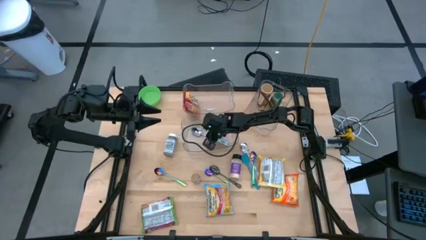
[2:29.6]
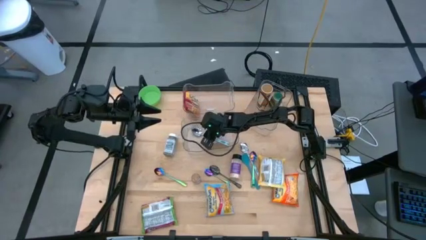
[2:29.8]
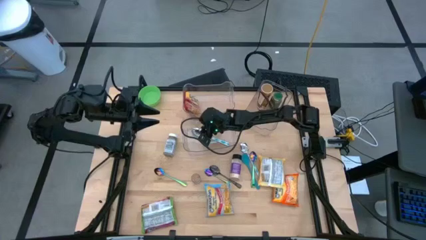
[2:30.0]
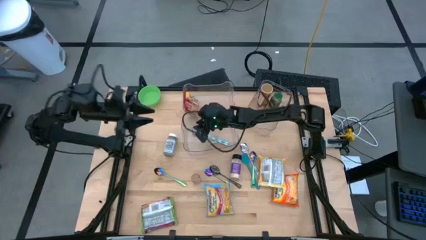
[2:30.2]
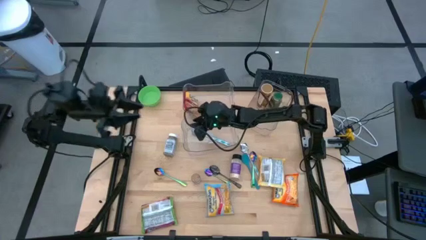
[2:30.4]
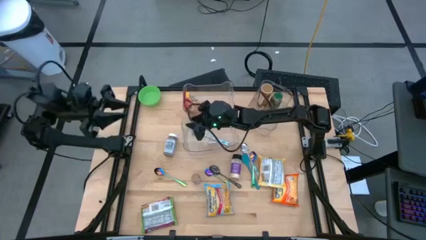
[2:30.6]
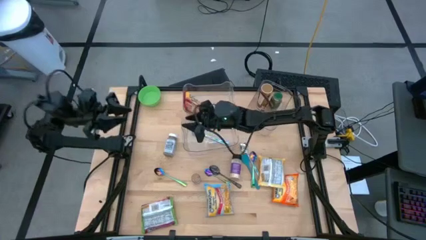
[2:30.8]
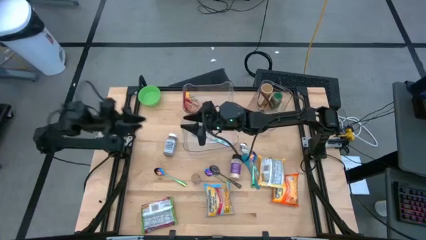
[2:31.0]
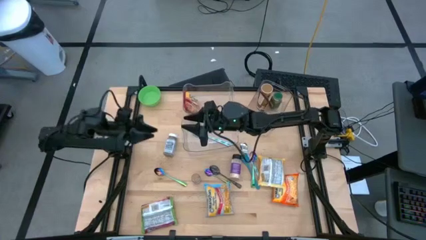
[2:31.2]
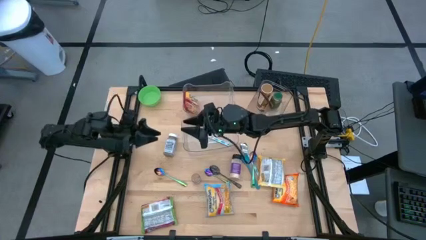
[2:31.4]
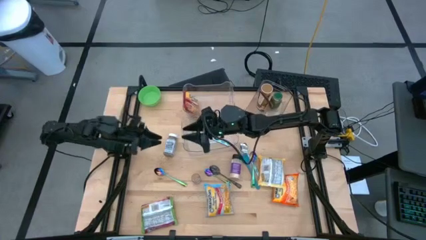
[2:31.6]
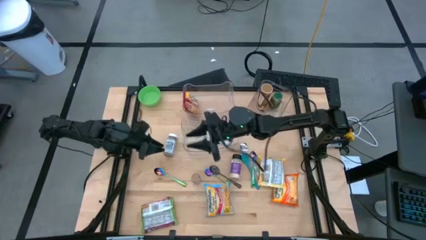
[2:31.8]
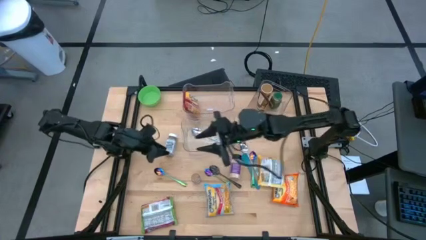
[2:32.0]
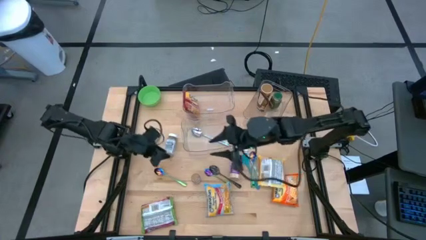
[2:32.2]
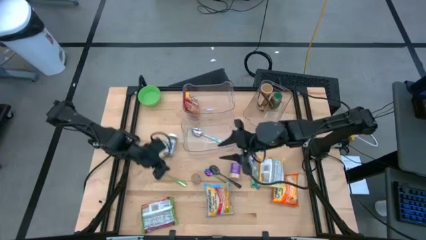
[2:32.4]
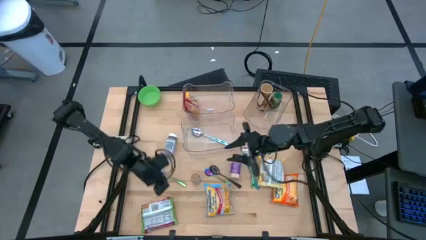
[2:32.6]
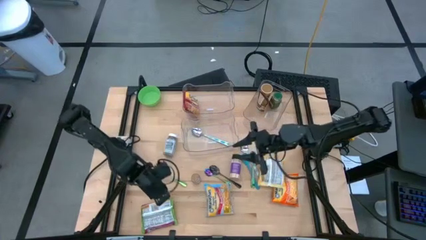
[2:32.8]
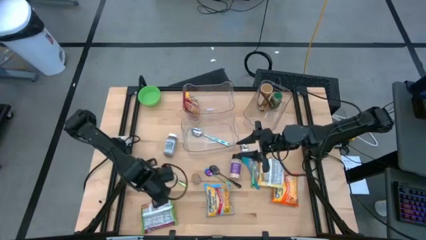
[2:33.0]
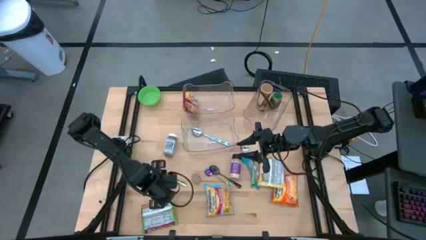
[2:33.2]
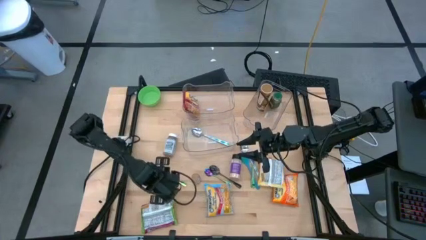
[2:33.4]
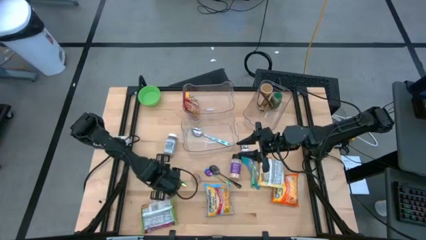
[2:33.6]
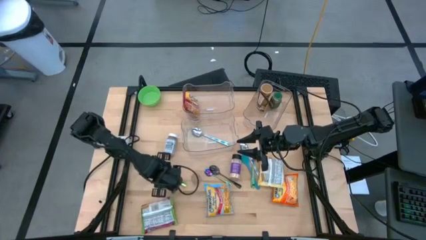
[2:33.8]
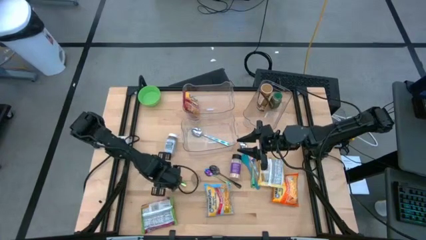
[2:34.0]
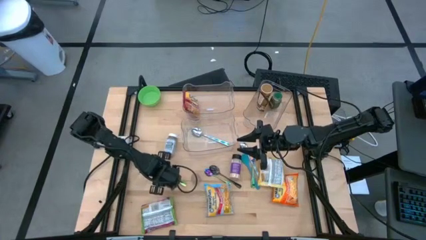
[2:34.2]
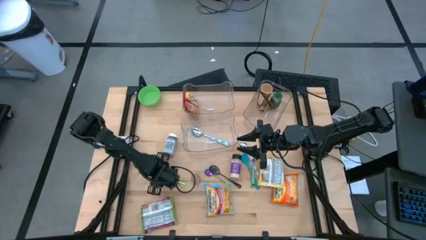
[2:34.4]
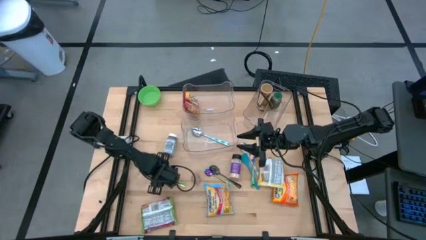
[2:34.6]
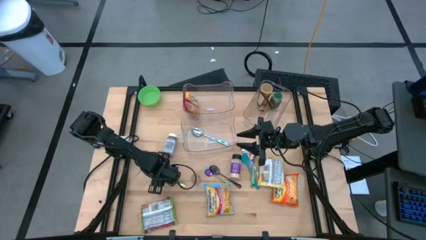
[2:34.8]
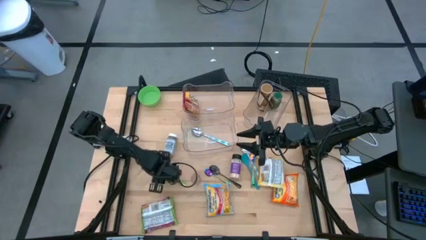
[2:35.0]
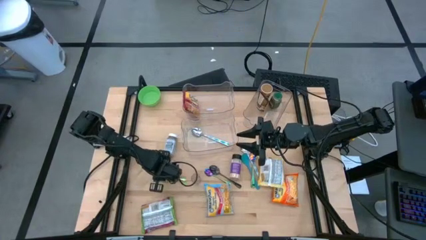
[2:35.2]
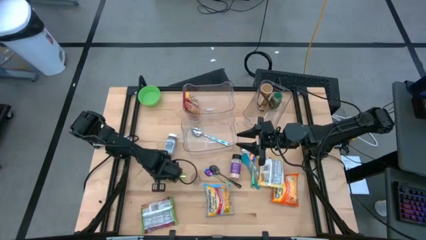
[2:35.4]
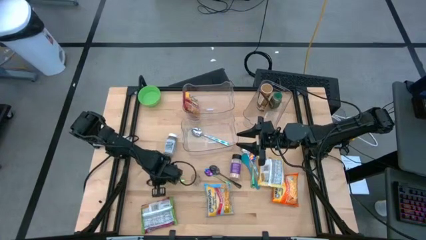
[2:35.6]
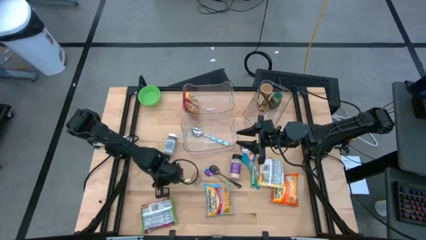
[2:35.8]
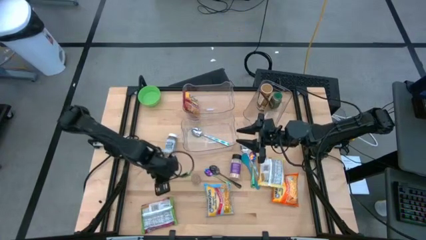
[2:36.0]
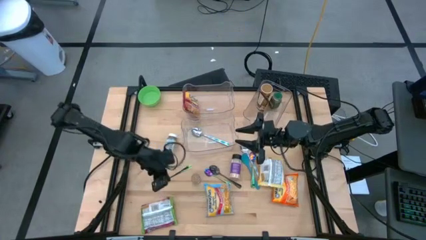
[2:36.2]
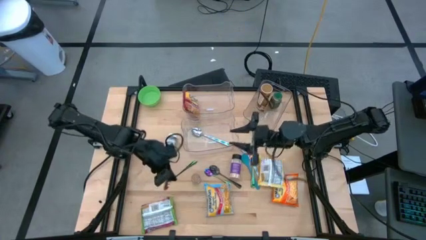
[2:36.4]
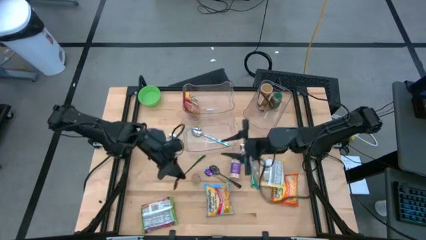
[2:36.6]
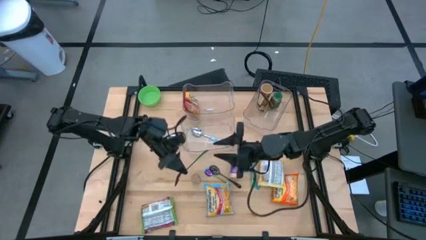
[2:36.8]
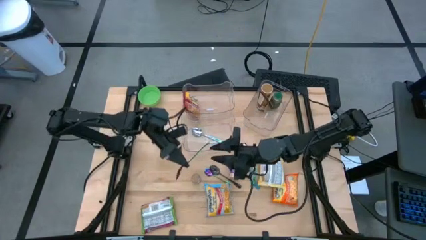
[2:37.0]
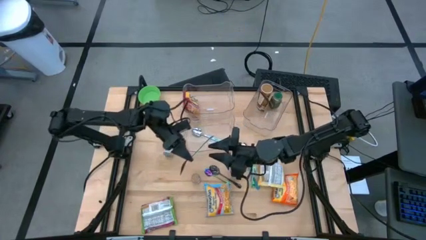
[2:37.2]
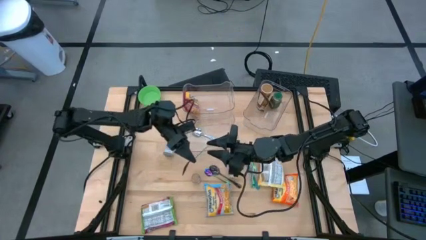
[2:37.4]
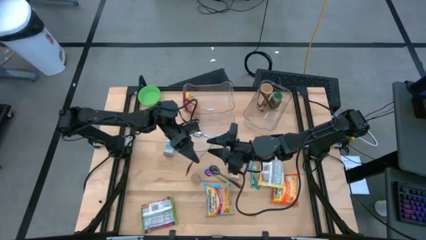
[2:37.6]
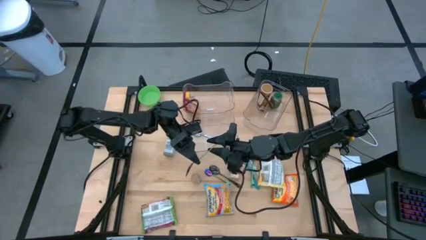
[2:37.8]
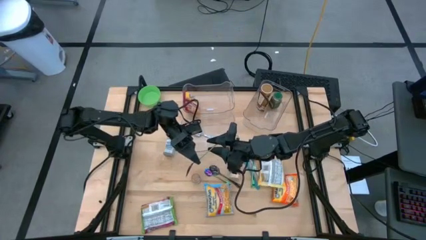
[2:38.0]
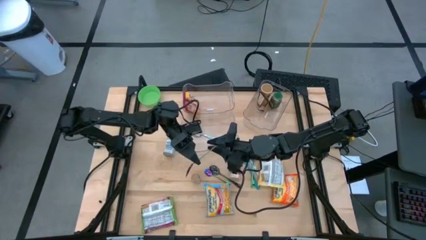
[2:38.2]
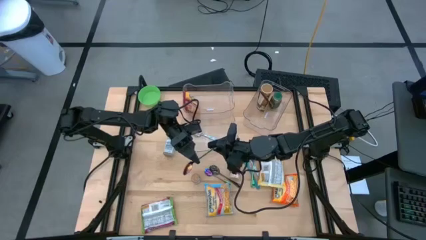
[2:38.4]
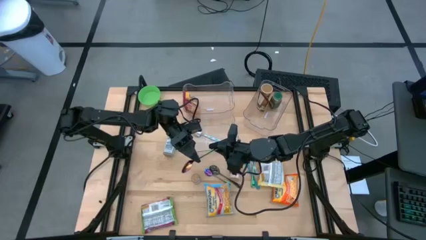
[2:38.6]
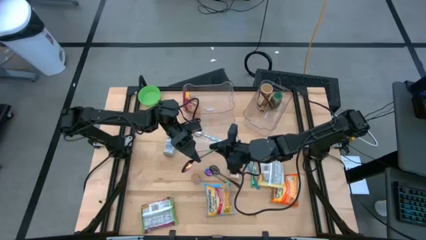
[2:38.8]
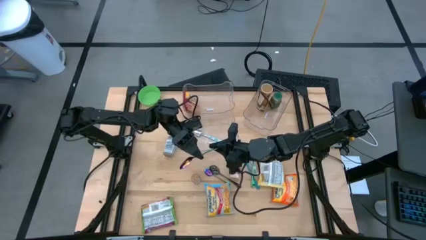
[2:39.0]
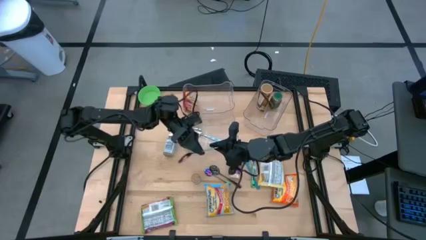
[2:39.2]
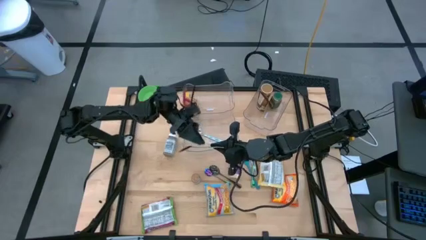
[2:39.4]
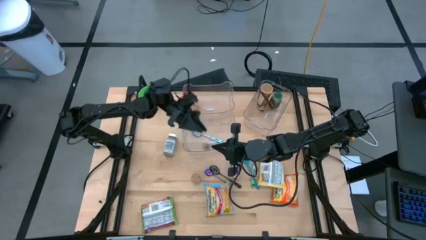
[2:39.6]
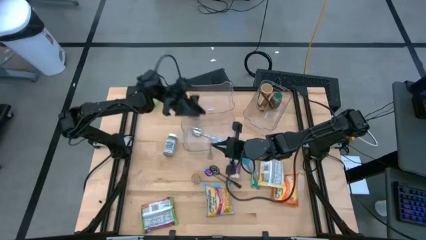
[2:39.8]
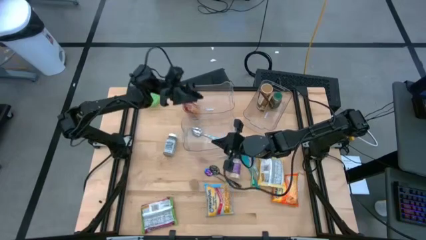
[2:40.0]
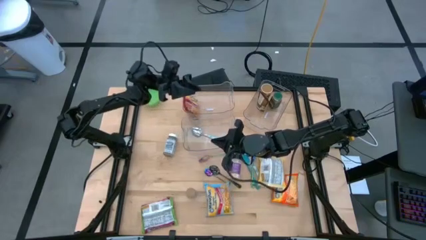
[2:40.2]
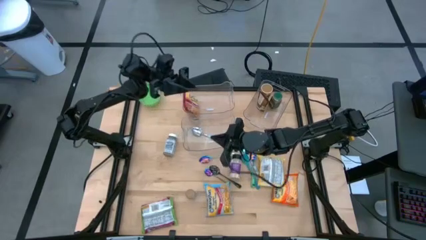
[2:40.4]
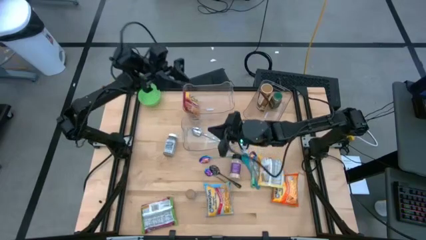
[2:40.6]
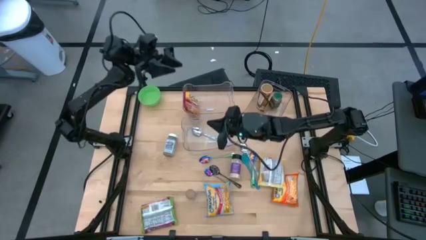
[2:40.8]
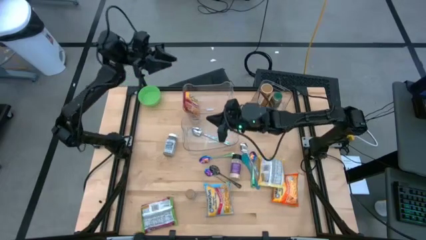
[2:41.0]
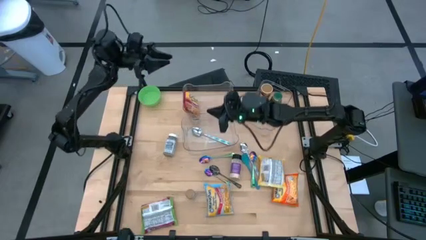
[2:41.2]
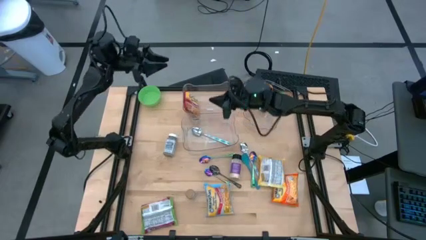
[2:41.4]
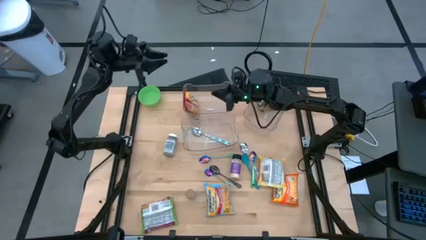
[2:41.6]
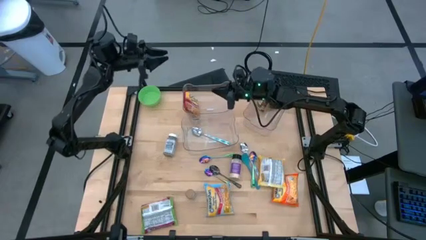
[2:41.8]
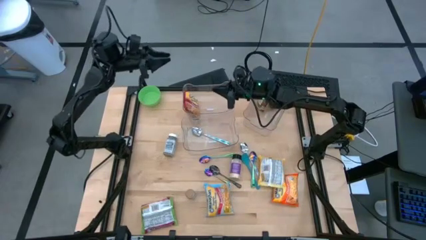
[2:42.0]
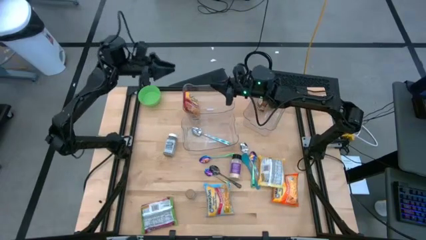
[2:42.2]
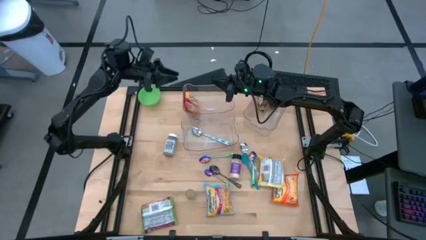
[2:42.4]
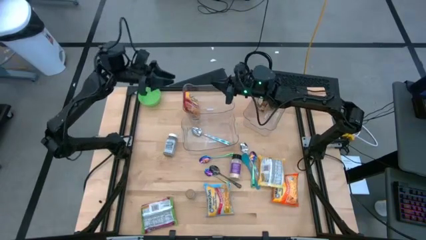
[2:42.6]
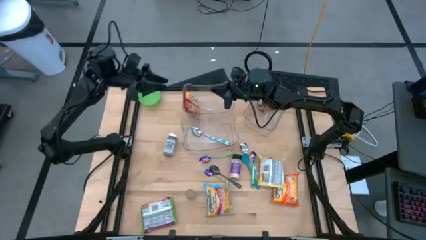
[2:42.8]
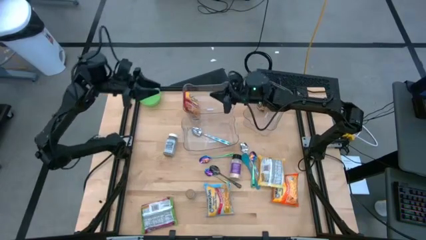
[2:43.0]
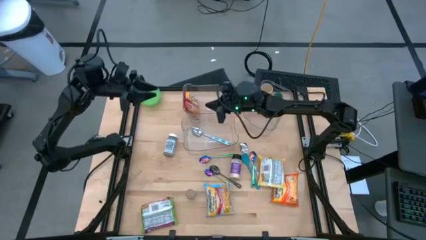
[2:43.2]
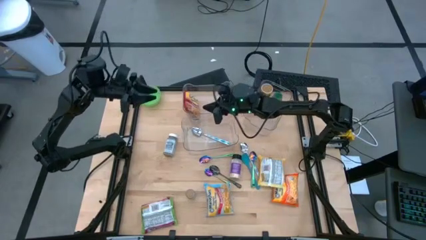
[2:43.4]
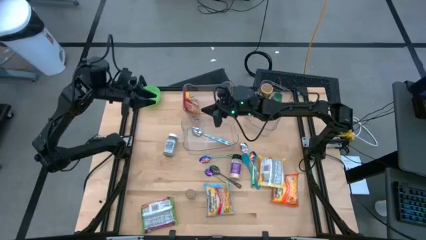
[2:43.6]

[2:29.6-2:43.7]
Task: Pick & Place Food Item
Put the left green spoon into the bottom transparent bin
